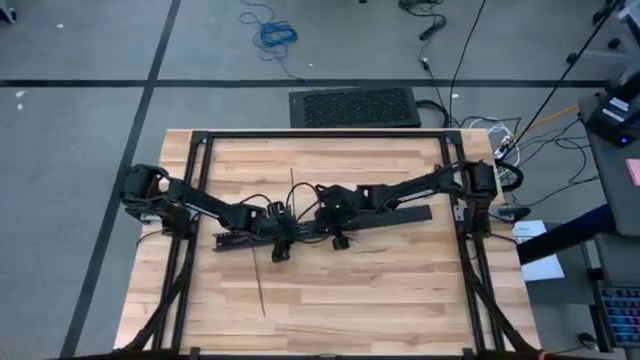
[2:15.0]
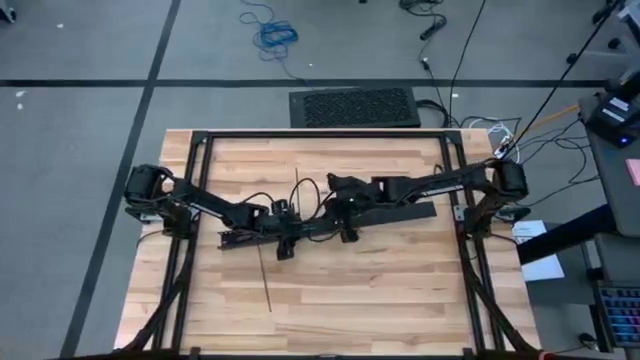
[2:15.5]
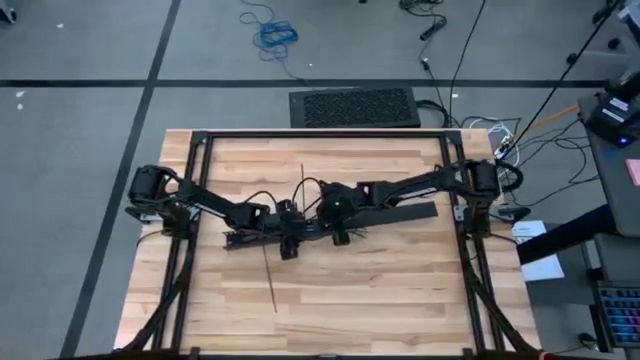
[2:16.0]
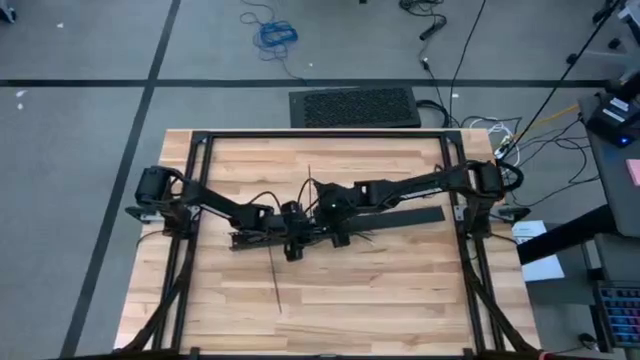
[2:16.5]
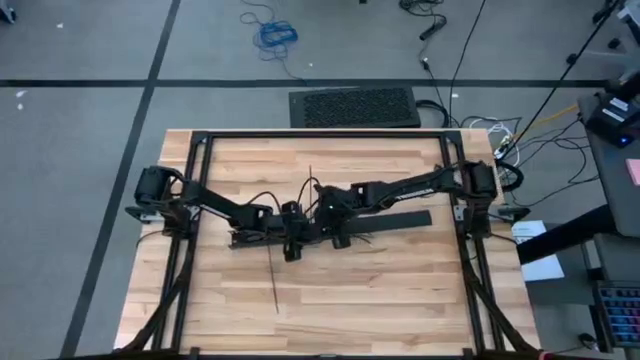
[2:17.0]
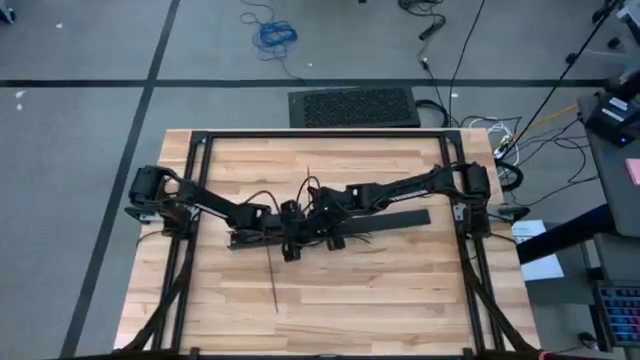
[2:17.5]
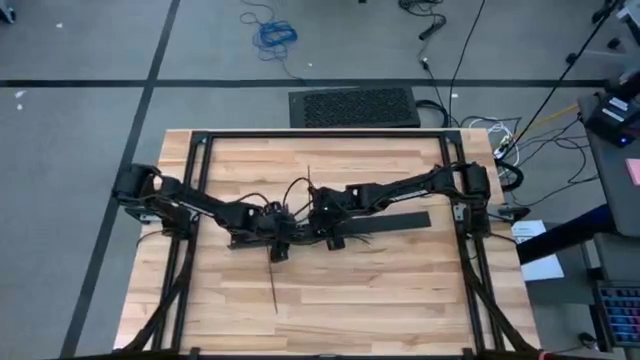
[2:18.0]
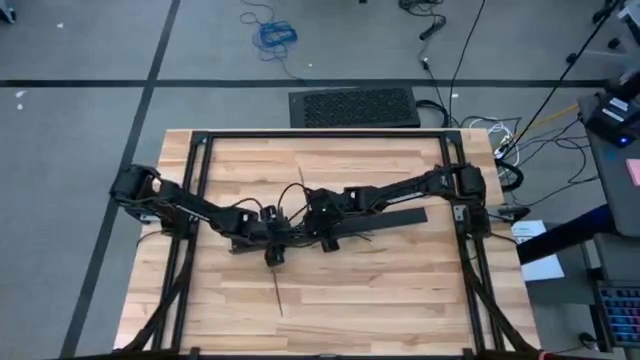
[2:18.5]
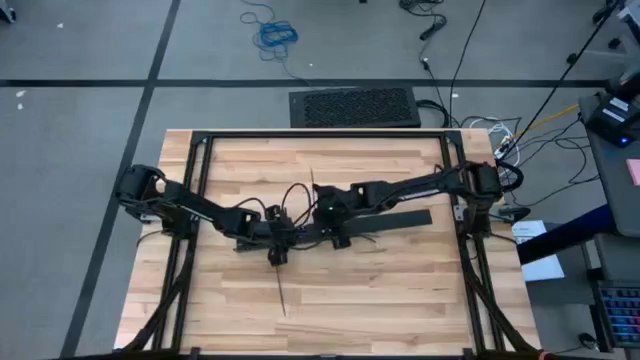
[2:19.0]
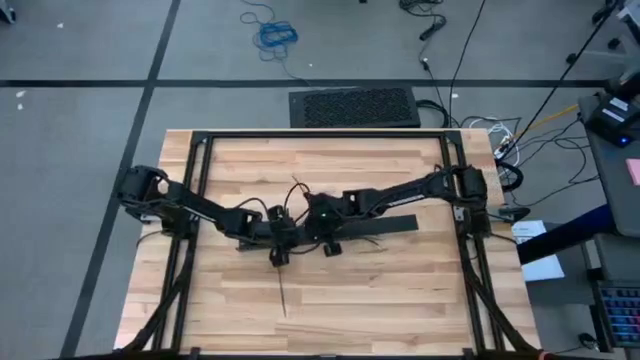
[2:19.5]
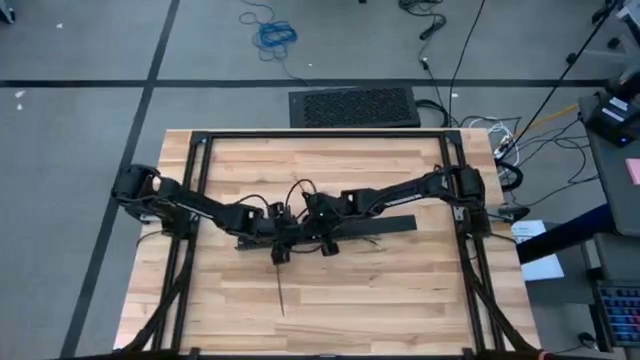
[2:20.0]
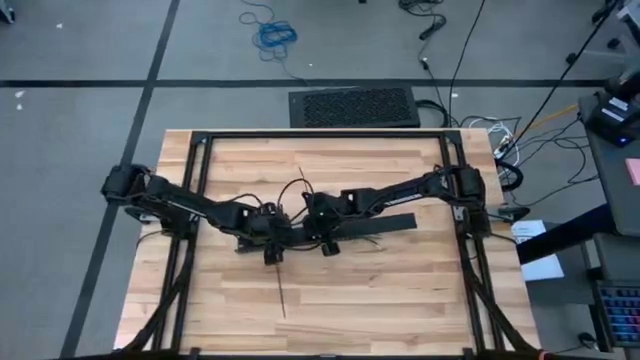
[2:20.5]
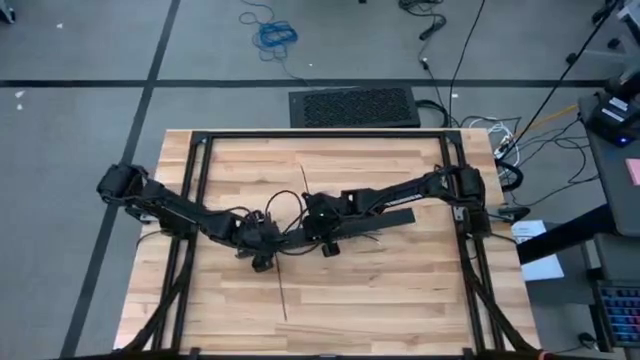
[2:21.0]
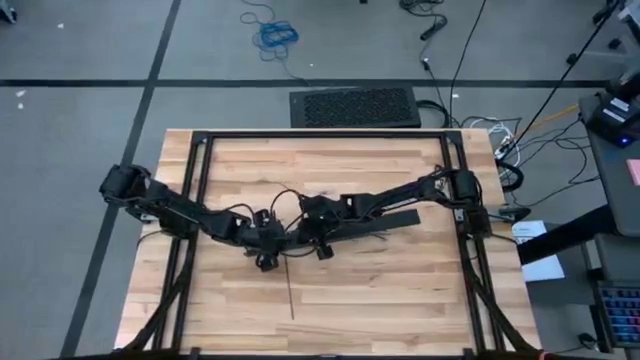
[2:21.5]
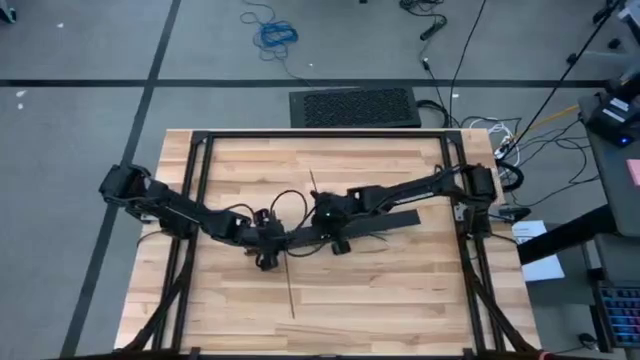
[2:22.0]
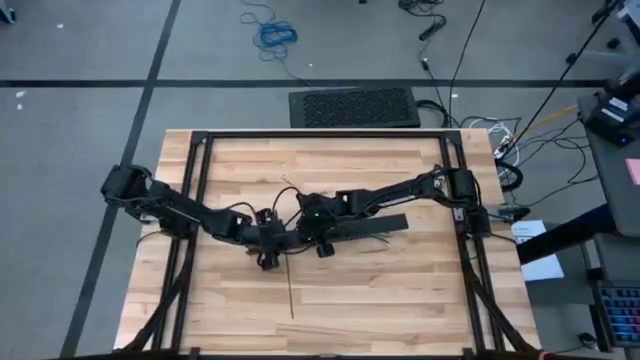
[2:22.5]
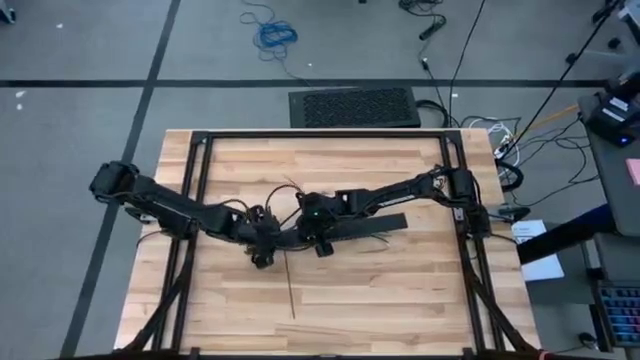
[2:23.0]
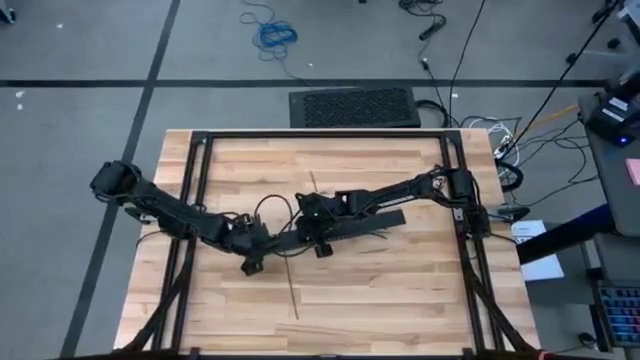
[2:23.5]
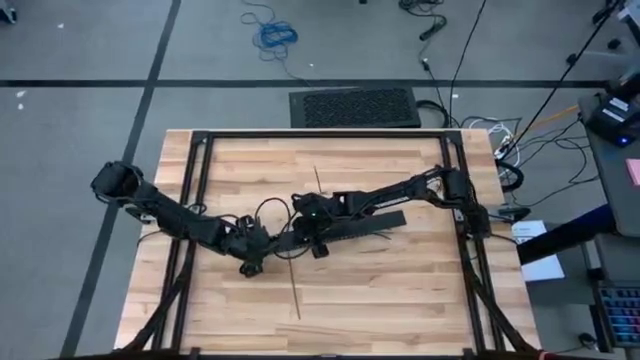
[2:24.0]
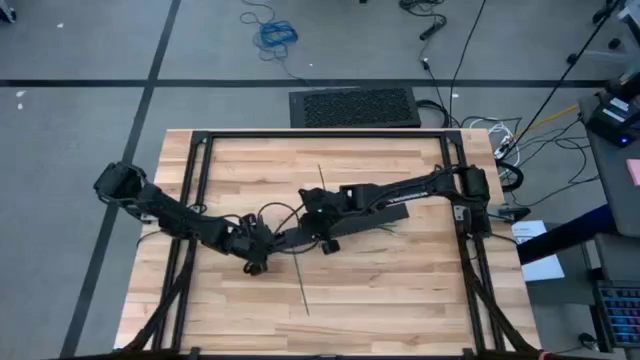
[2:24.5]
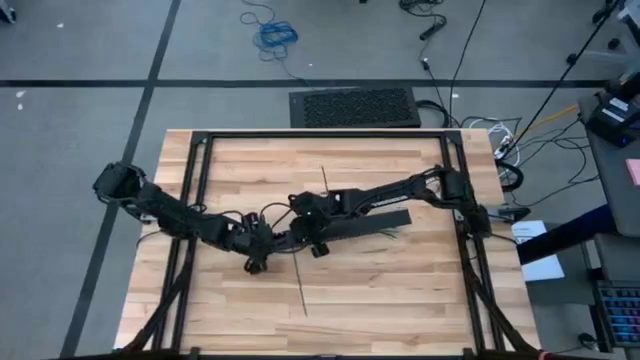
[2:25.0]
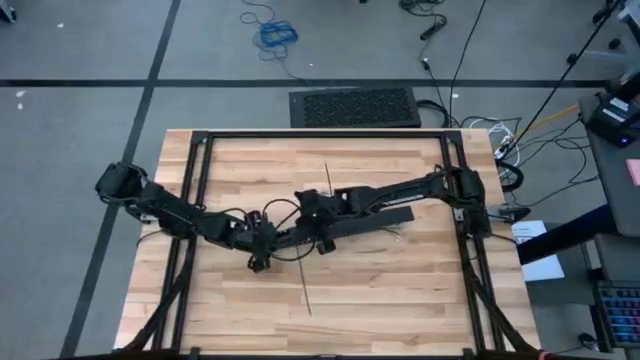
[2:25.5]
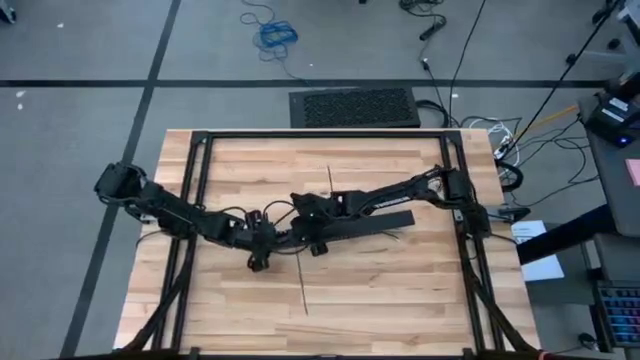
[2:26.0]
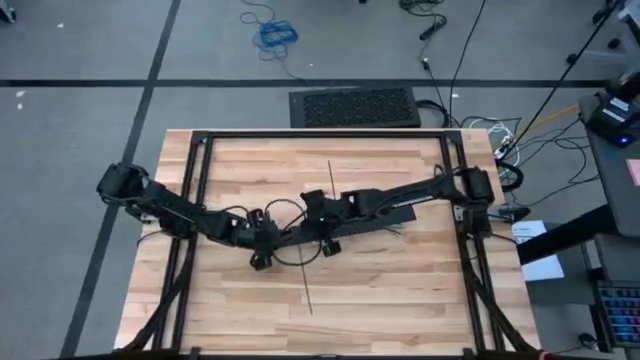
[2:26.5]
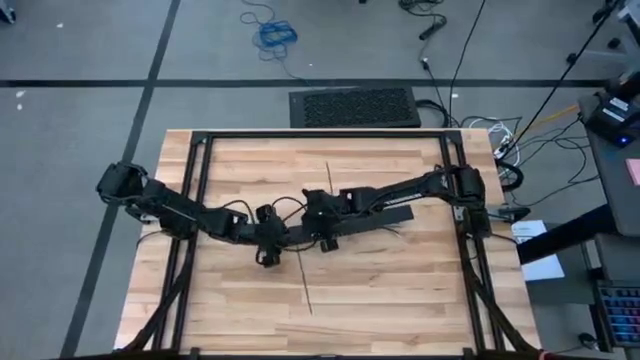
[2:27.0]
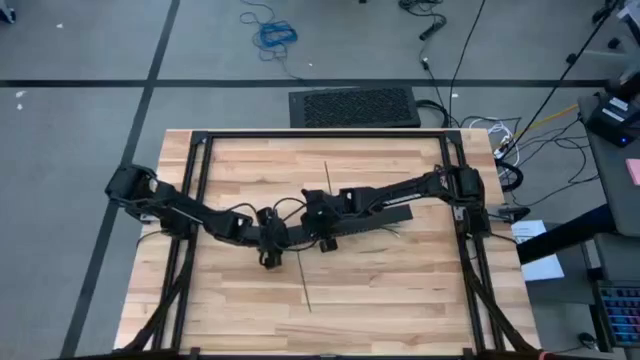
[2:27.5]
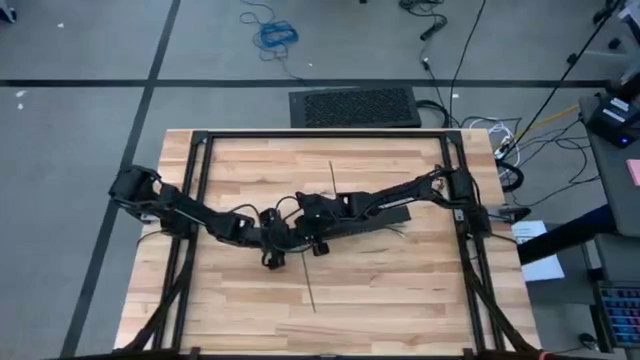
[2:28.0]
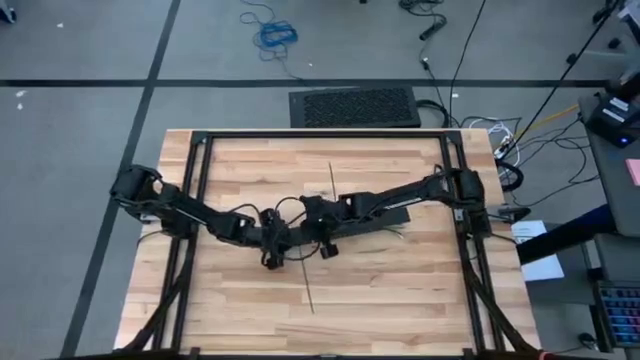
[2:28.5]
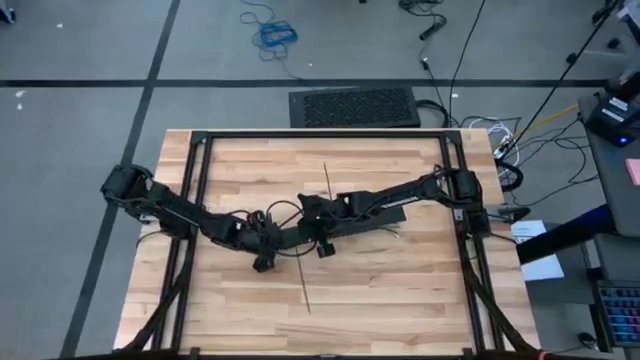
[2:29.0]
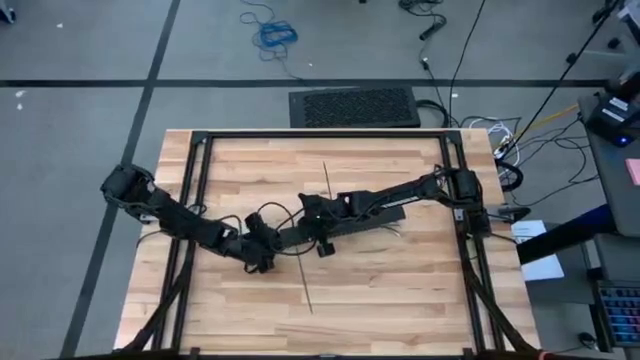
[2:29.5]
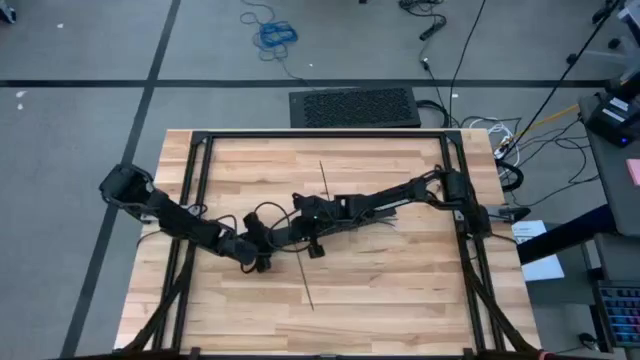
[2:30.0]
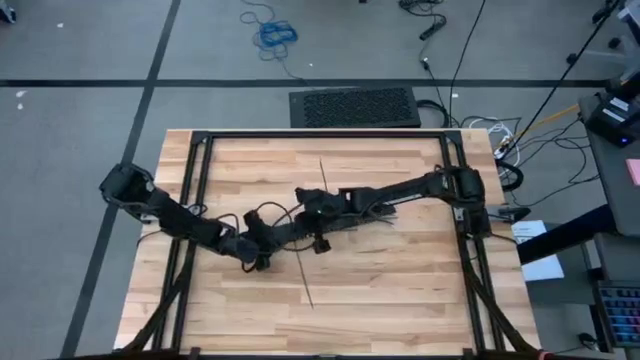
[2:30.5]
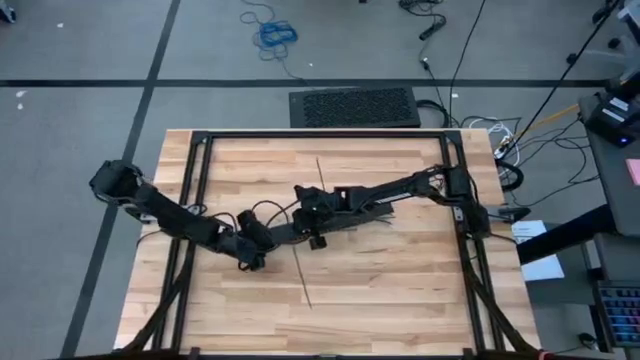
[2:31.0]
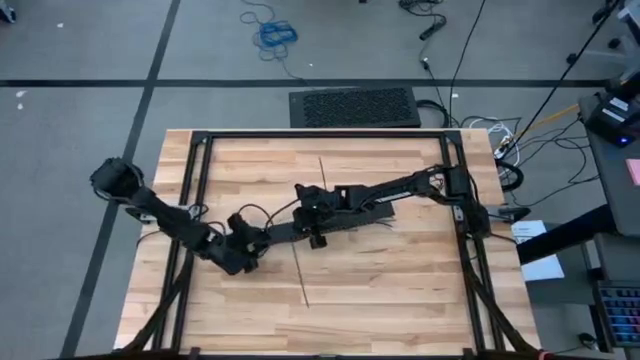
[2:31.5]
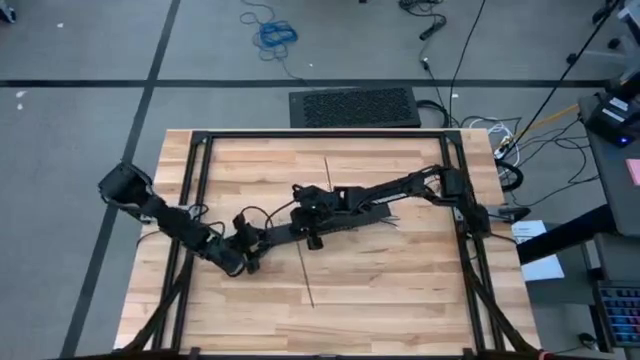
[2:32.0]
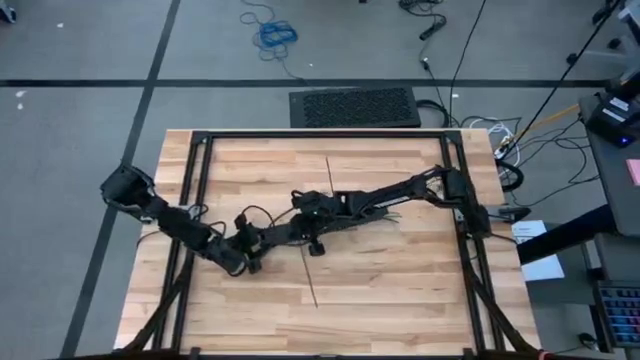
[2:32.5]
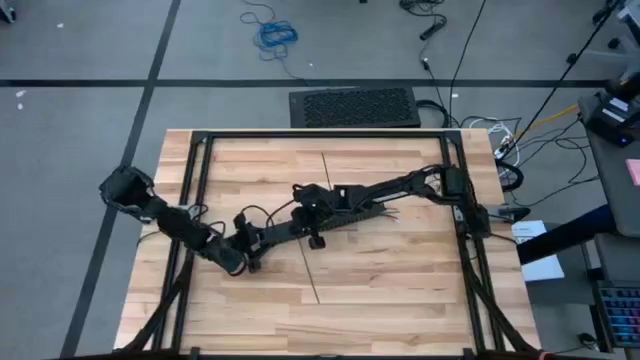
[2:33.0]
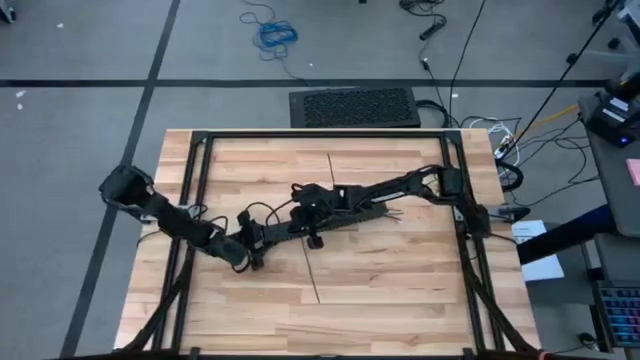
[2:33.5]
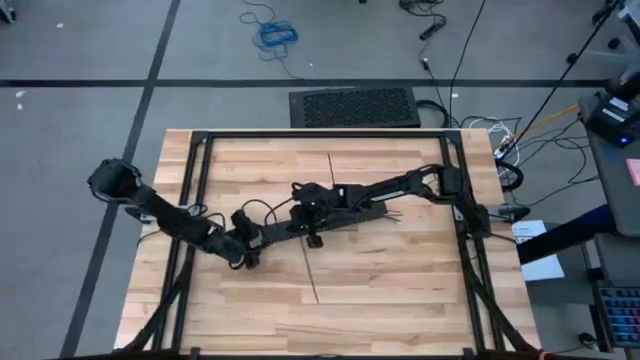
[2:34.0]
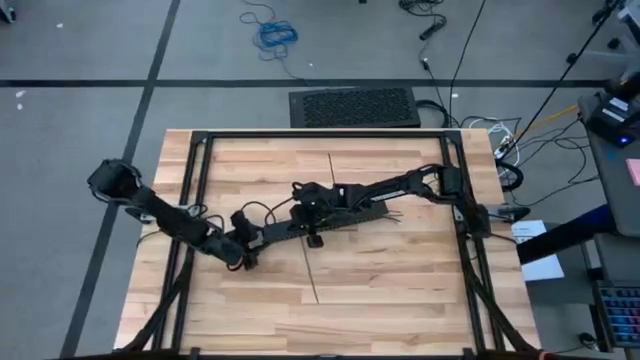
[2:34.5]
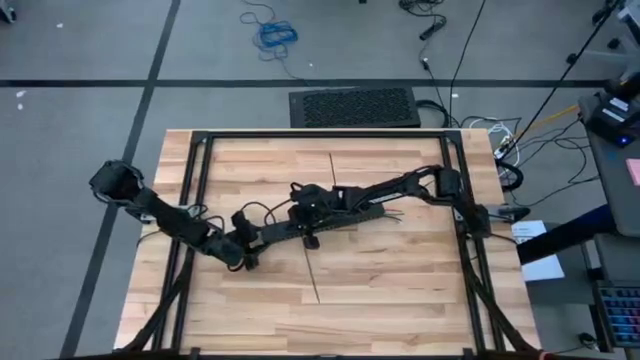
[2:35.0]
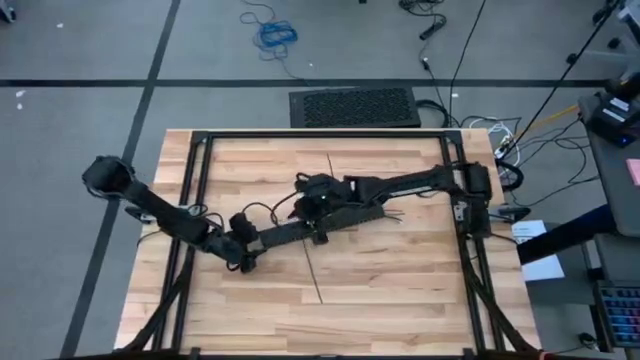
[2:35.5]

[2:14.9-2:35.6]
Task: Ziptie cables
Insert the black cable duct cover into the black cable duct

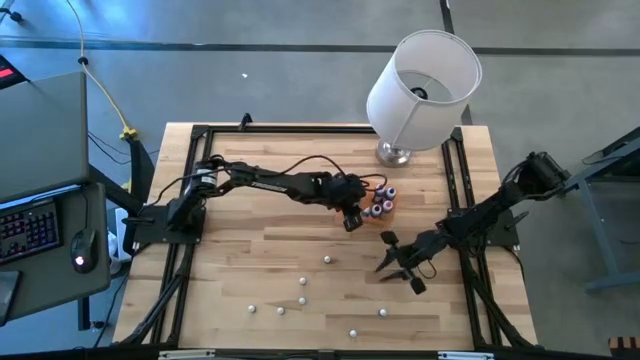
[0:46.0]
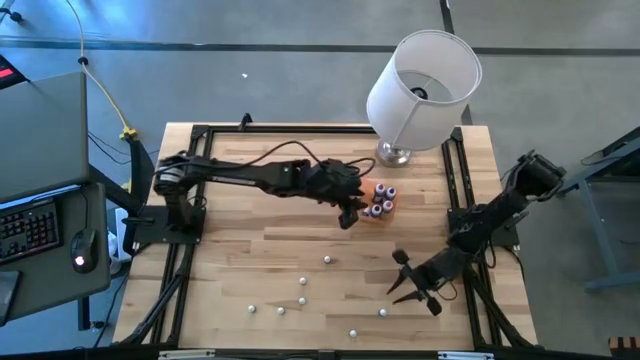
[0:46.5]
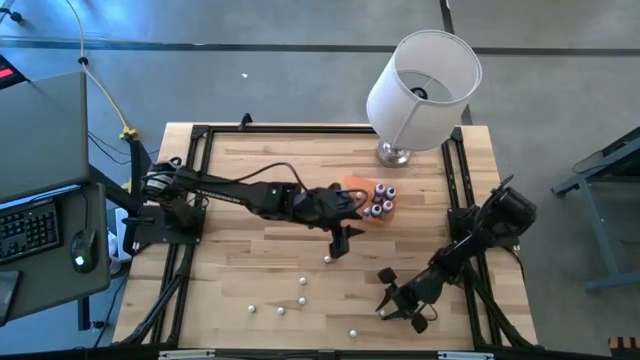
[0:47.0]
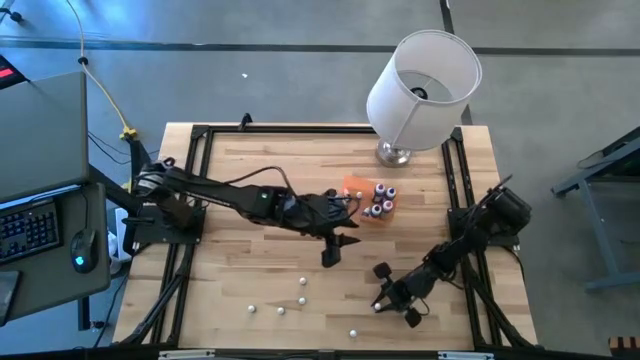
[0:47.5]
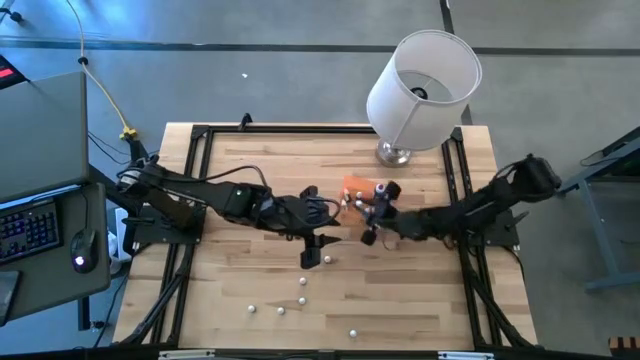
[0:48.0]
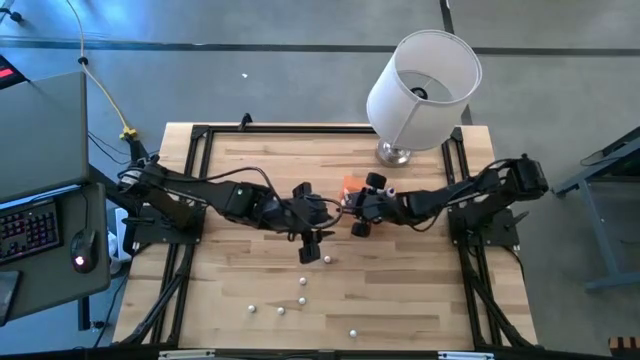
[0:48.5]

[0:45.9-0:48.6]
Task: Pick & Place food coloring
Put the top small green food coloring bottle into the orange container
